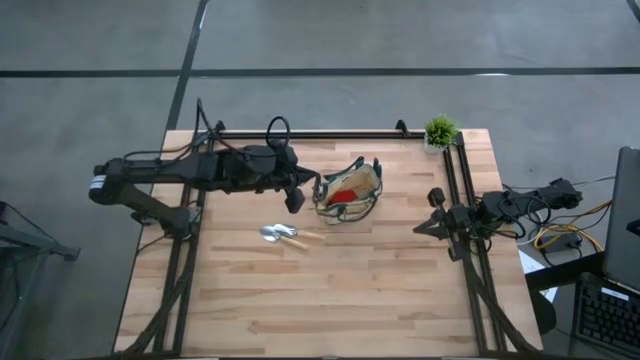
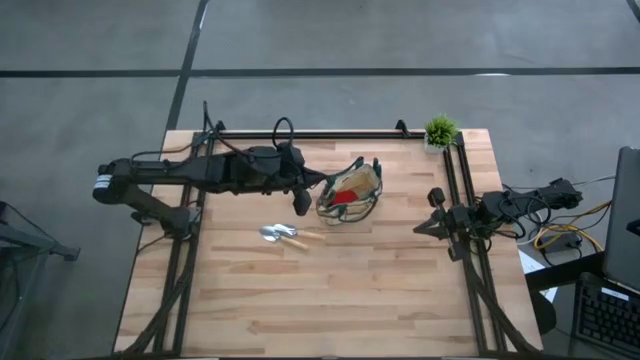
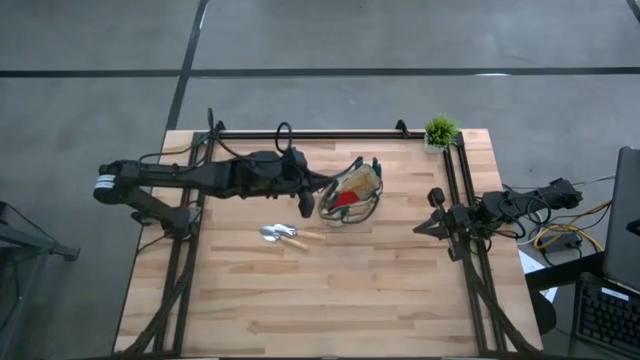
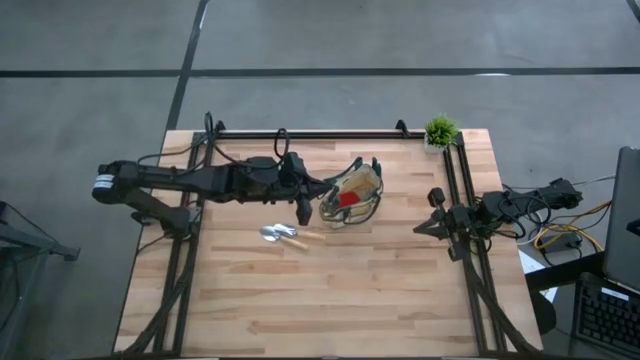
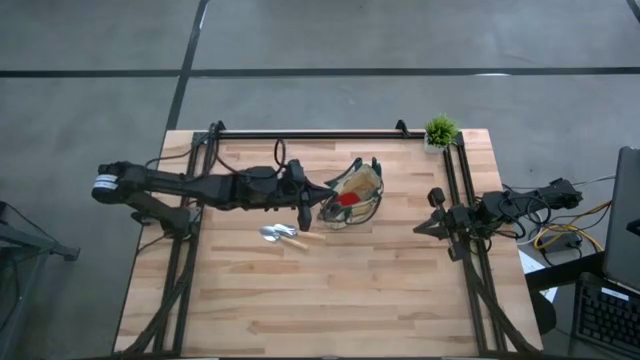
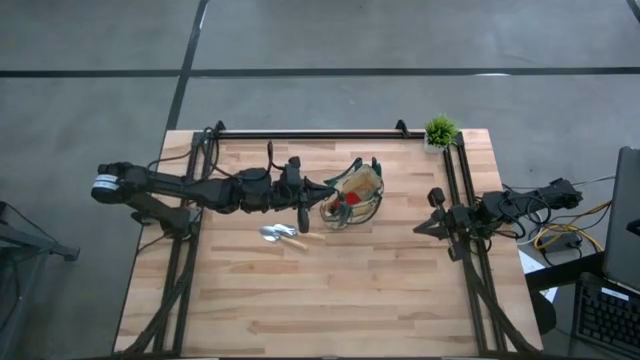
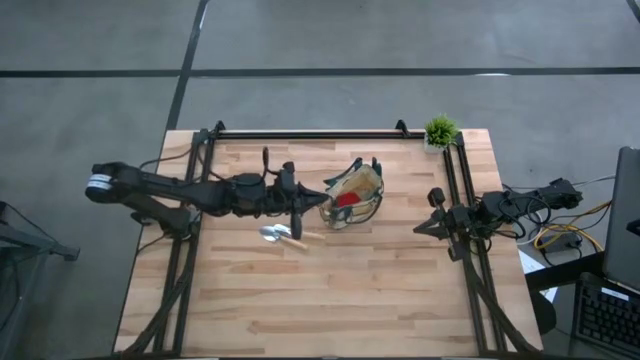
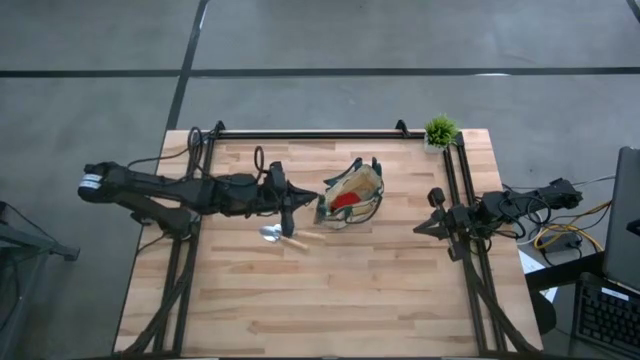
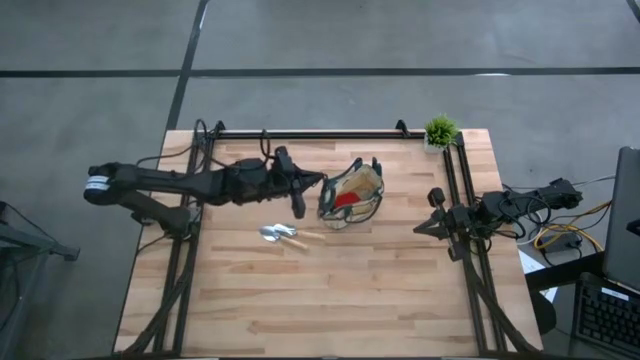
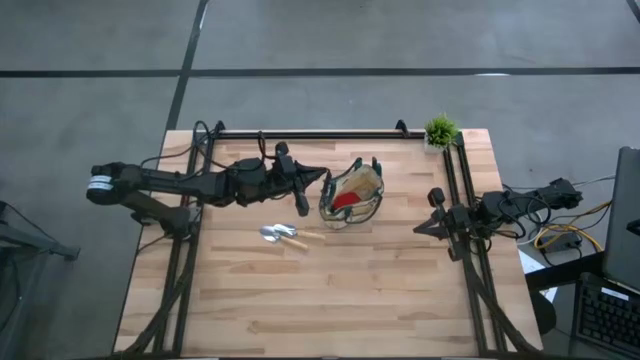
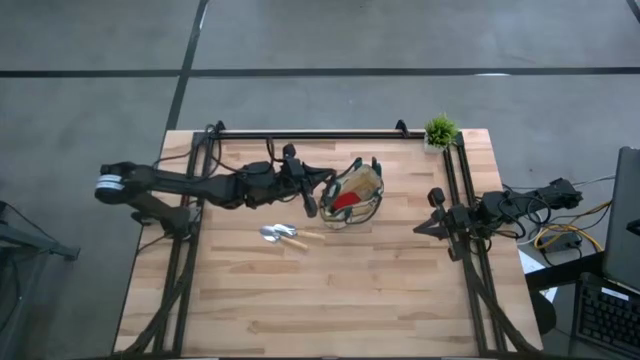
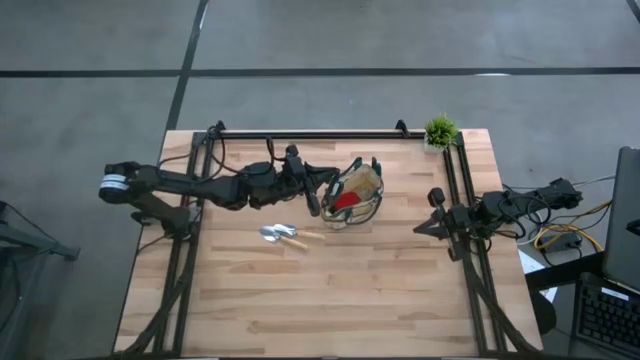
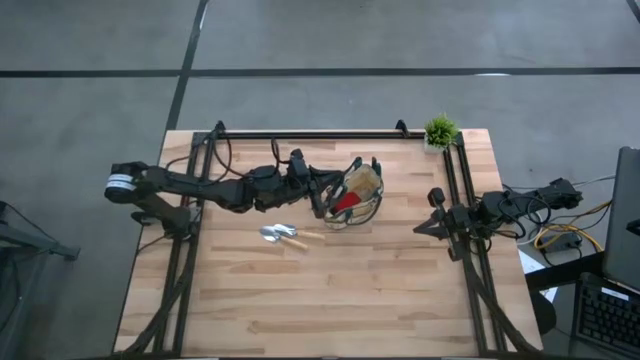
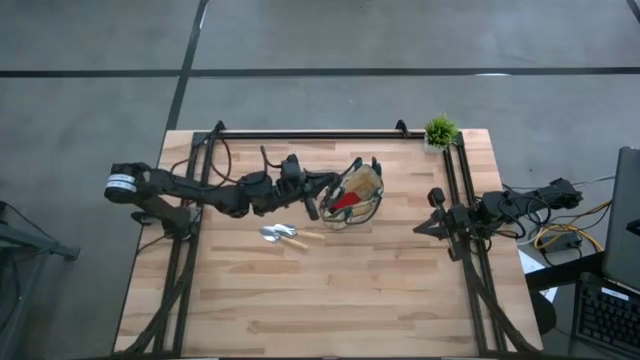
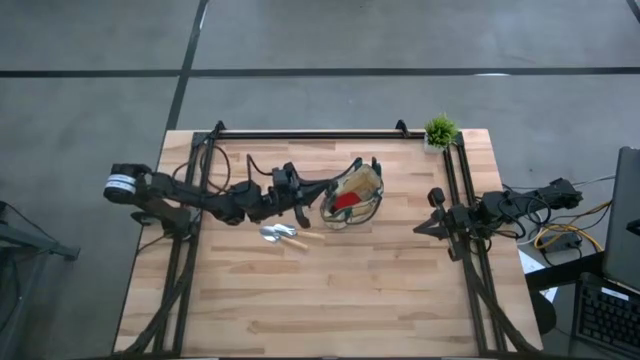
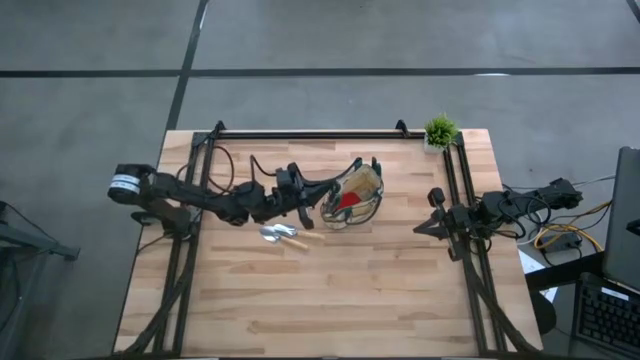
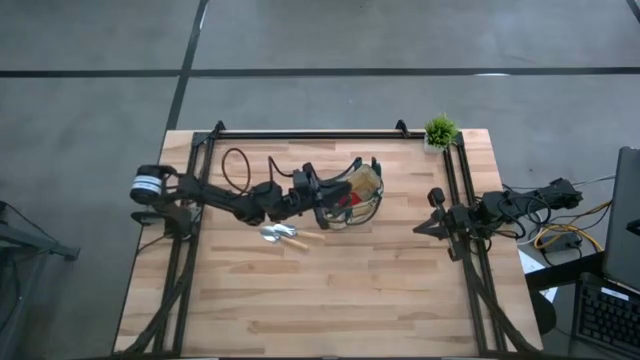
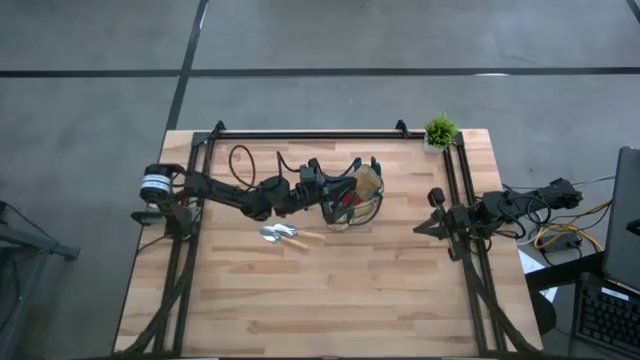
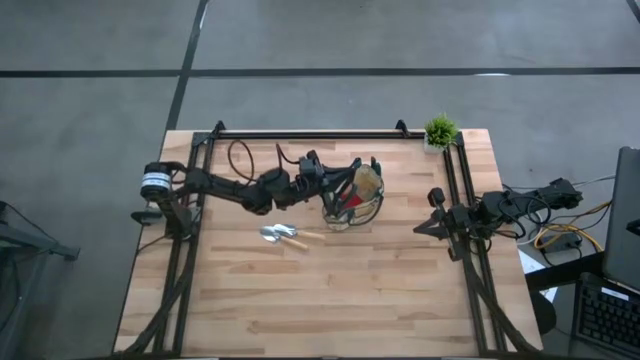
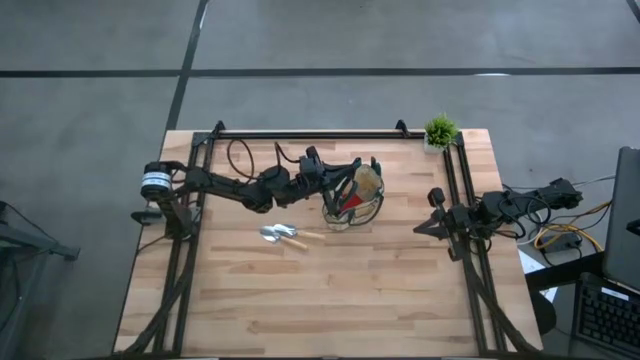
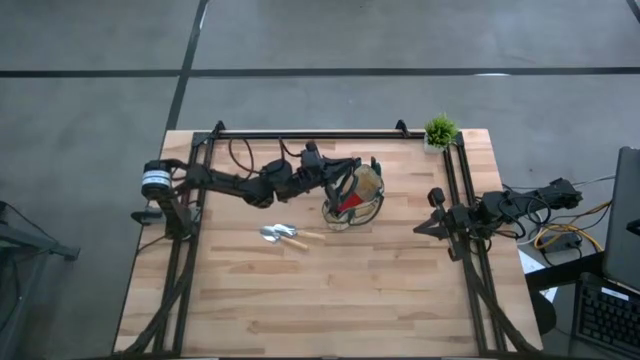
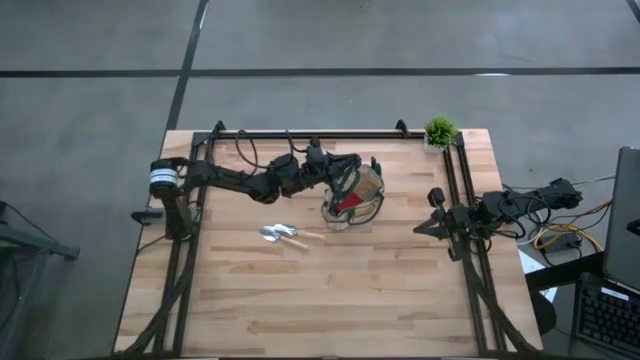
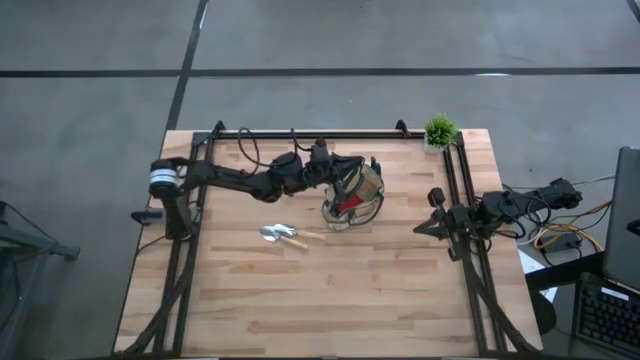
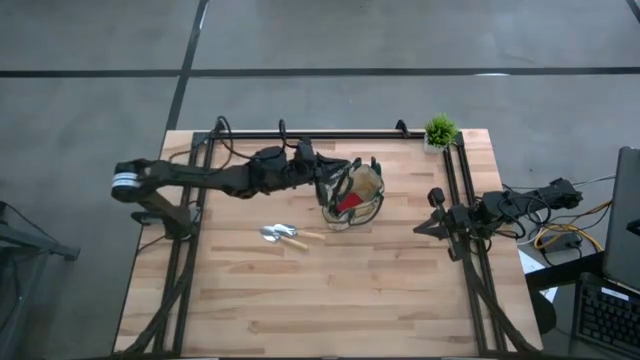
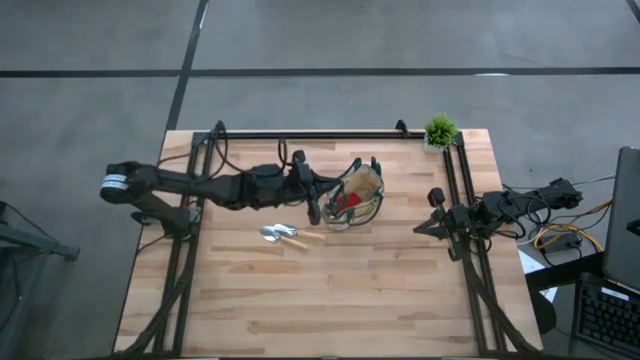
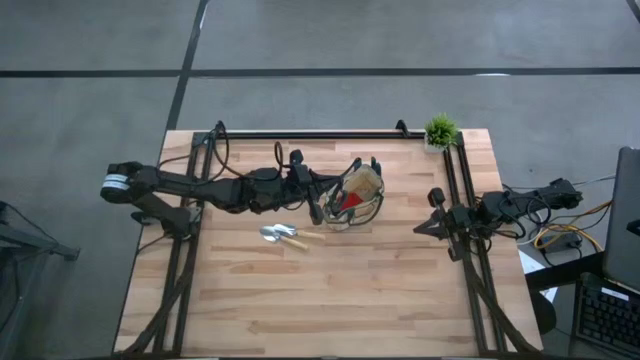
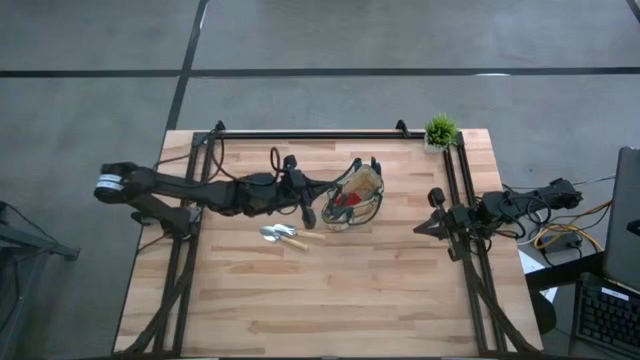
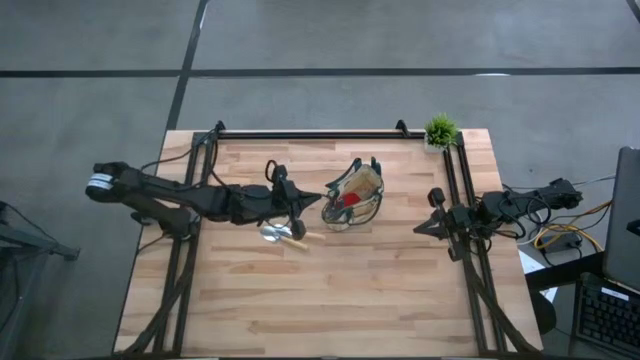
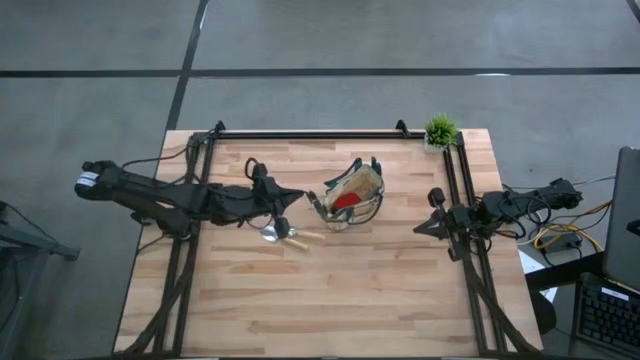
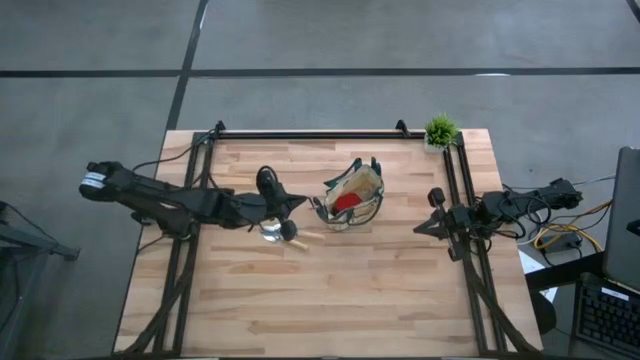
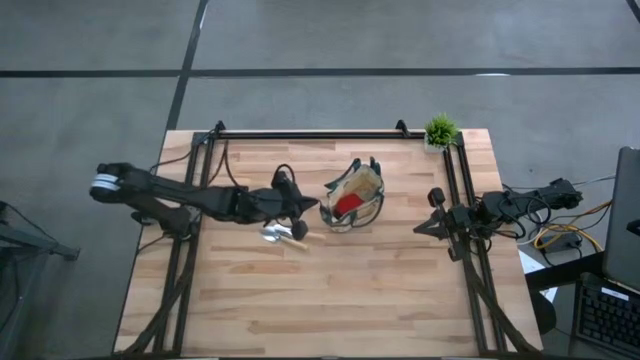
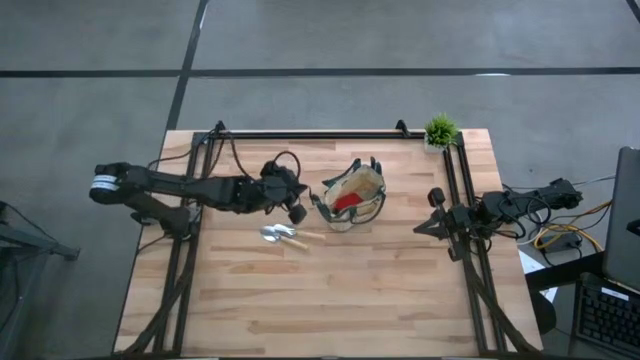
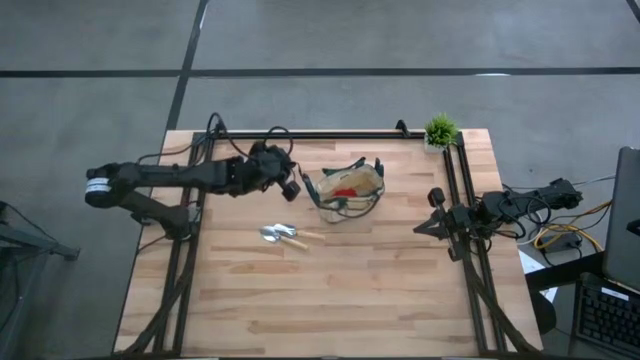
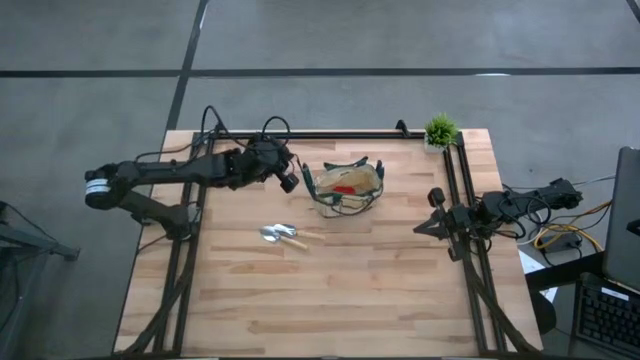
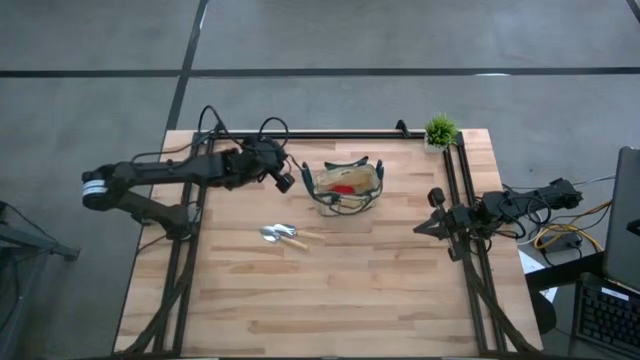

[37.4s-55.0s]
Task: Pick & Place Garden tools in Gardening bag
Put the green scissors into the brown bag
